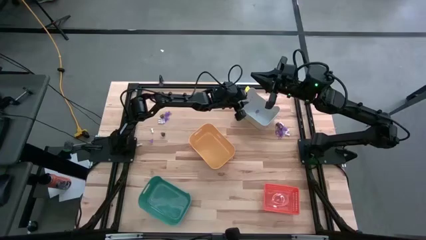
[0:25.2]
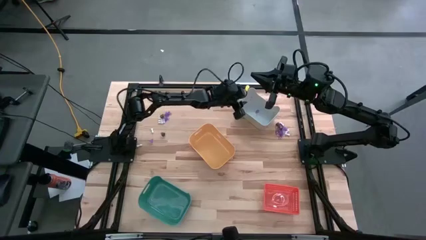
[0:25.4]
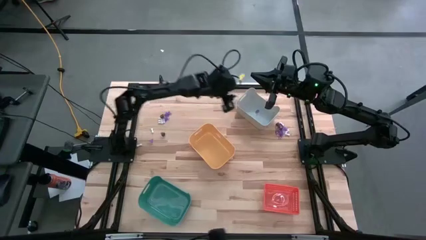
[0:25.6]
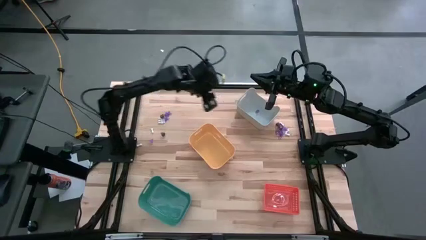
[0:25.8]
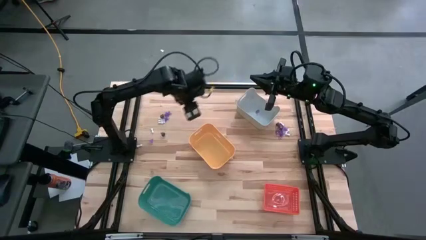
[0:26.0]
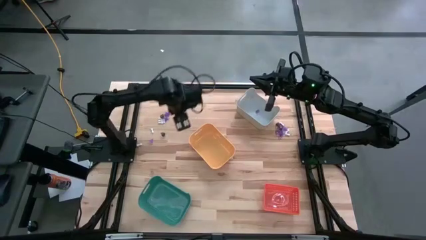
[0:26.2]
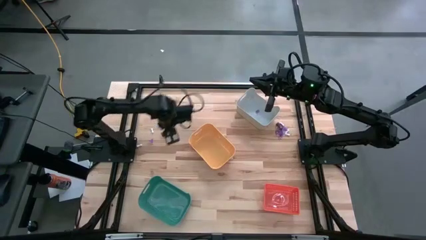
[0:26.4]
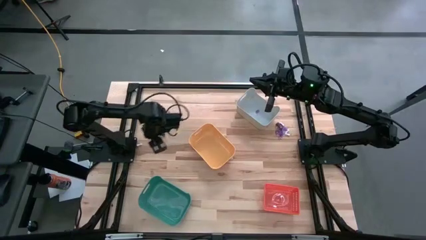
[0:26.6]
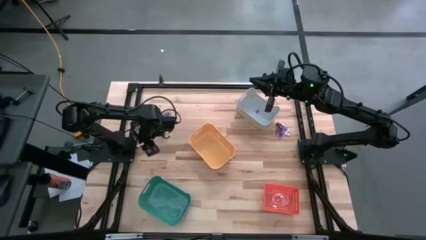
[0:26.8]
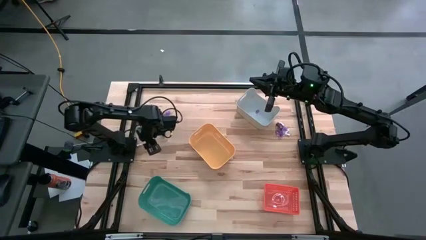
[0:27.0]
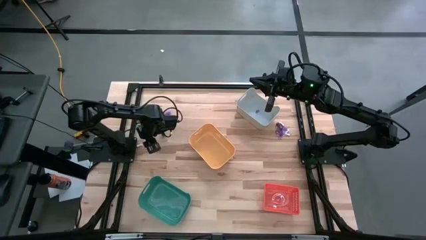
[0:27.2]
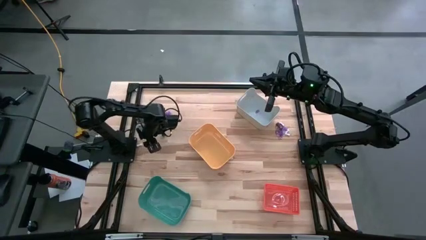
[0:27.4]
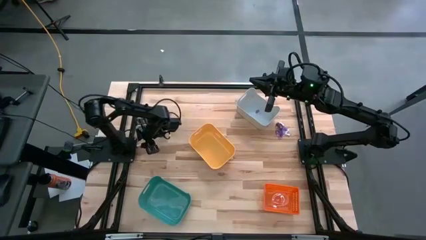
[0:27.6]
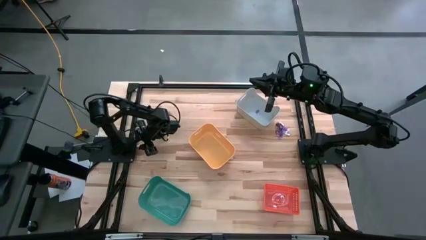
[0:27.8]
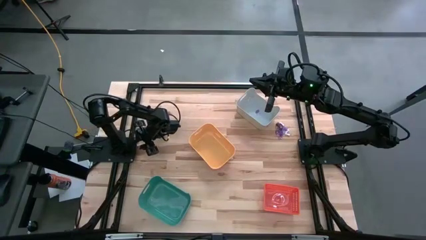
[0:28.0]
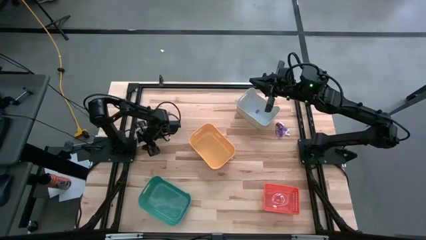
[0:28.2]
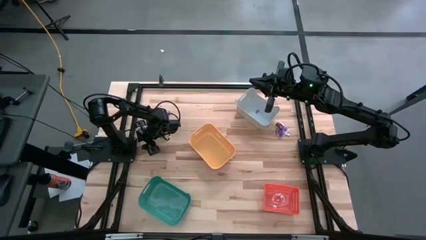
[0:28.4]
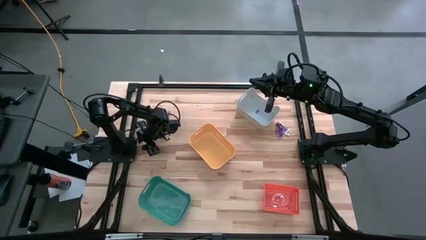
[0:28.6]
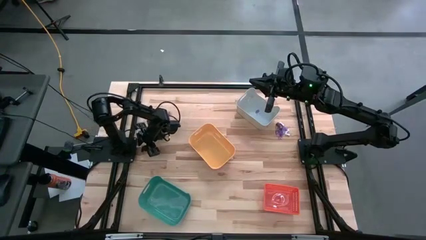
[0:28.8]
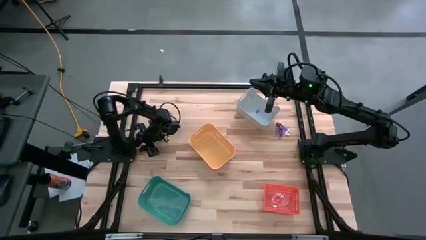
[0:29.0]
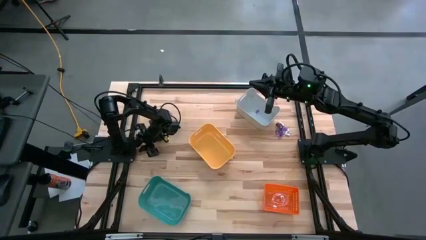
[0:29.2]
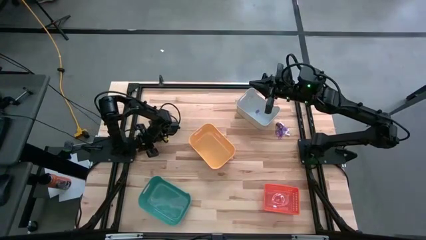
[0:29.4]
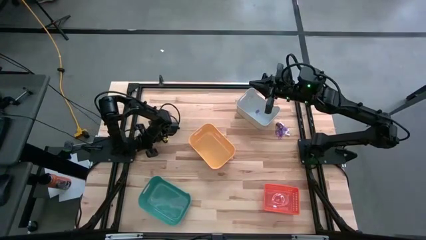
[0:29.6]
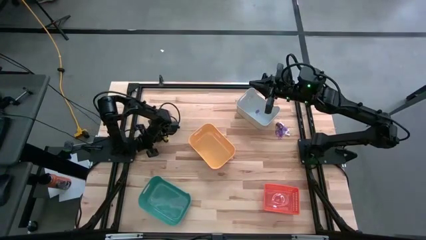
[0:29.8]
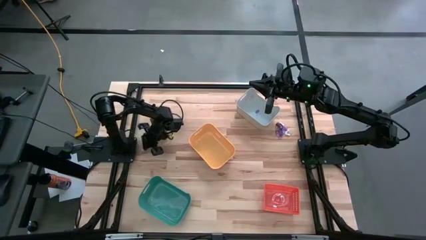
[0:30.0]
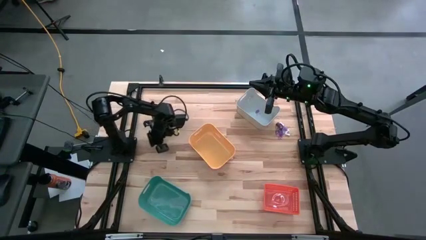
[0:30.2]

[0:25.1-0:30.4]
Task: Sort Halloween decoration
Put the white bone toy into the yellow bin

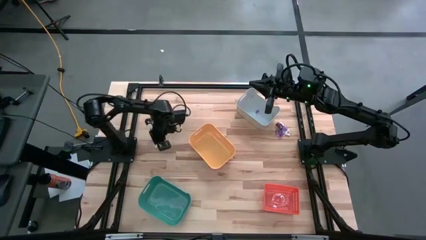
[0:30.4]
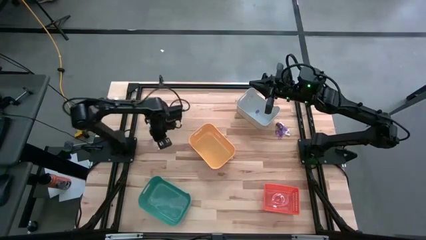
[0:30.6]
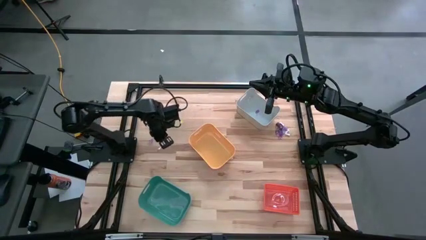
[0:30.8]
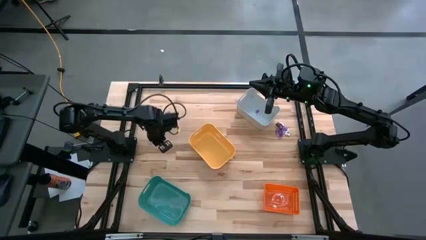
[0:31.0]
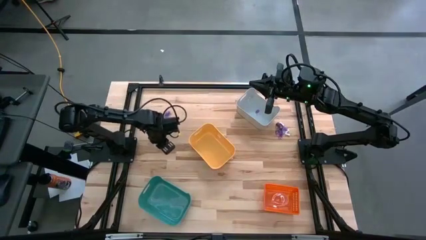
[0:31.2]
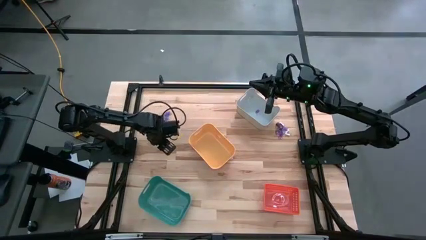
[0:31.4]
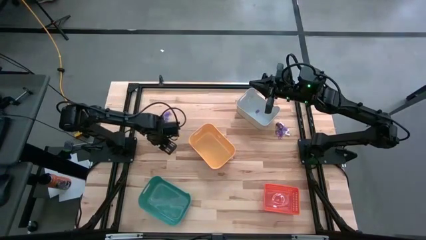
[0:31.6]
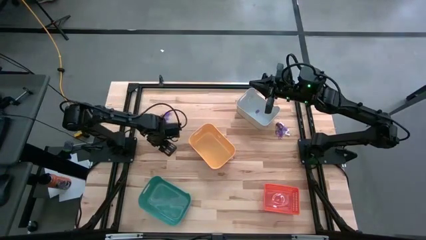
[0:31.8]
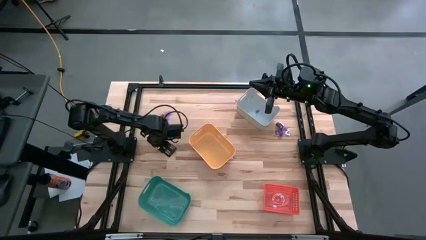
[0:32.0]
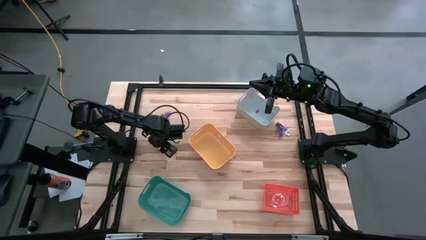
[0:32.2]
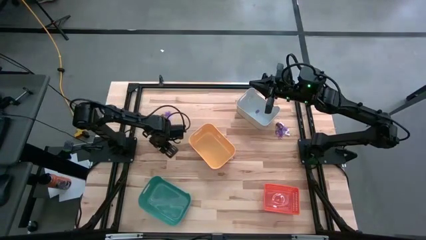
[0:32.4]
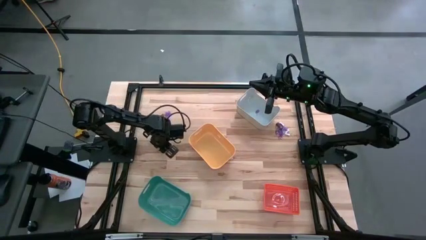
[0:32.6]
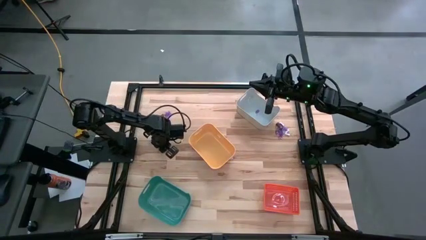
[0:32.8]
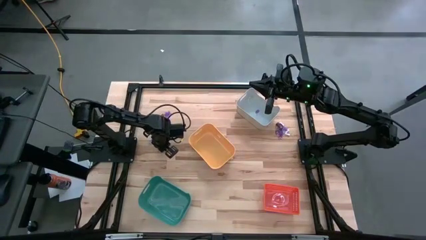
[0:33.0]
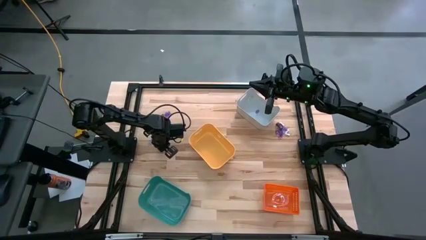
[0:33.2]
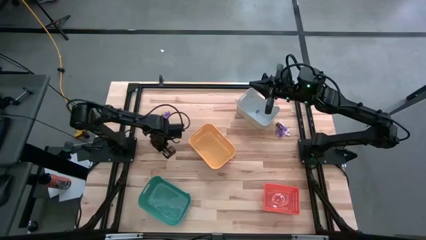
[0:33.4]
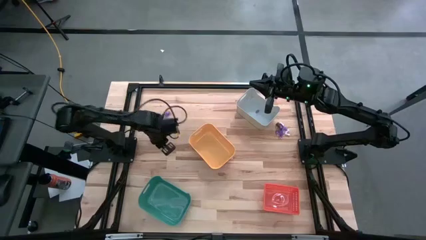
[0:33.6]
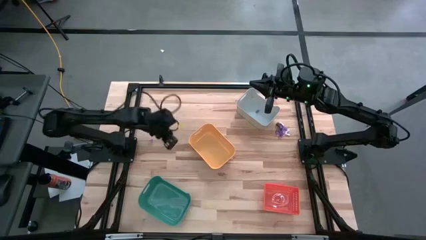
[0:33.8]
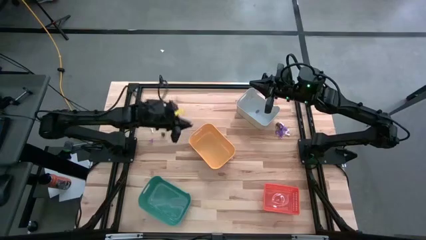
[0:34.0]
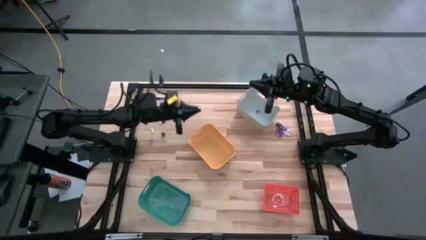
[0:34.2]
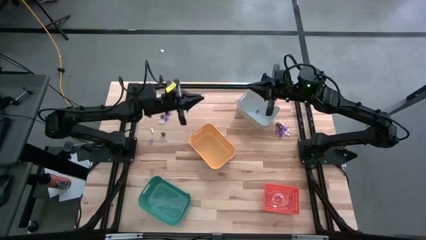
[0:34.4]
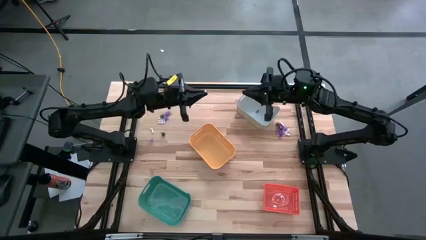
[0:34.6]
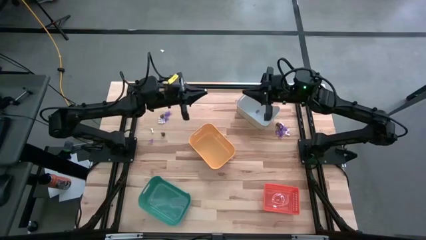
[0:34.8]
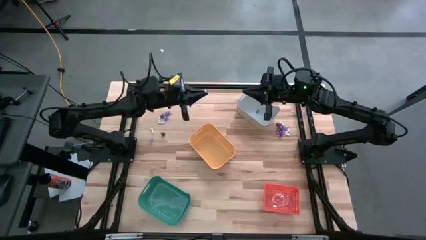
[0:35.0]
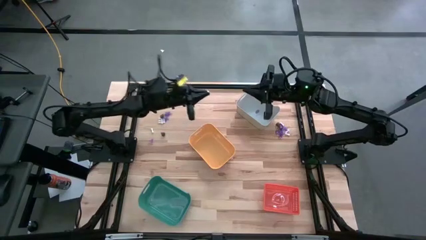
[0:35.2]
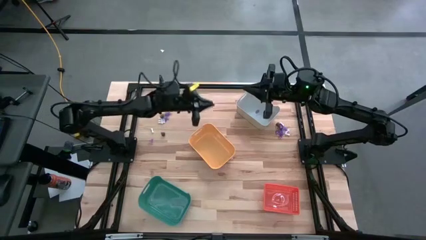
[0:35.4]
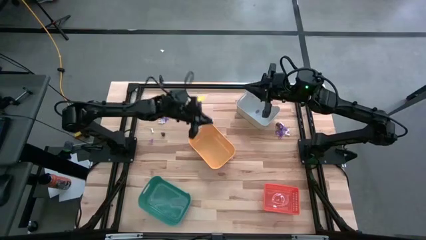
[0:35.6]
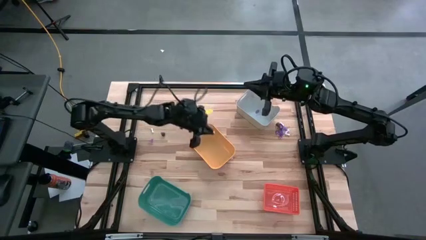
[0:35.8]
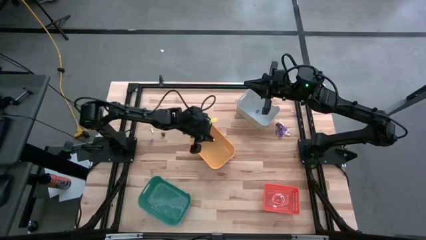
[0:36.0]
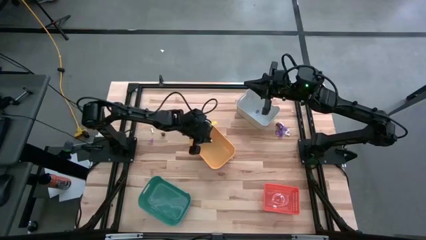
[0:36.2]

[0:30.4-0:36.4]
Put the white bone toy into the yellow bin

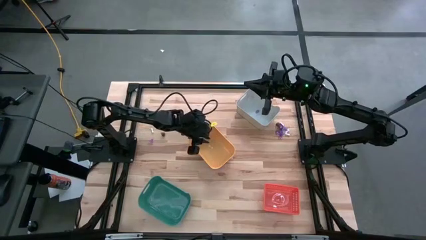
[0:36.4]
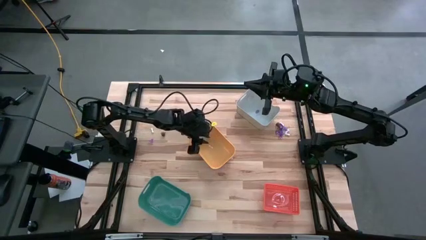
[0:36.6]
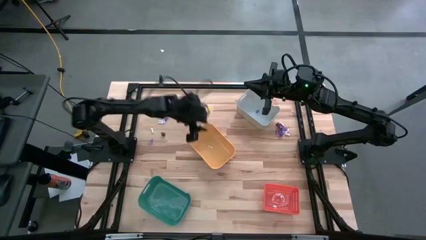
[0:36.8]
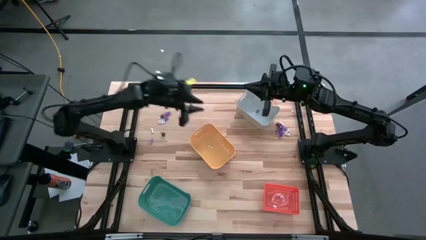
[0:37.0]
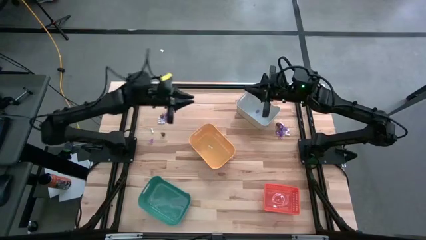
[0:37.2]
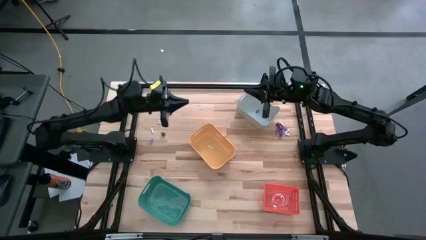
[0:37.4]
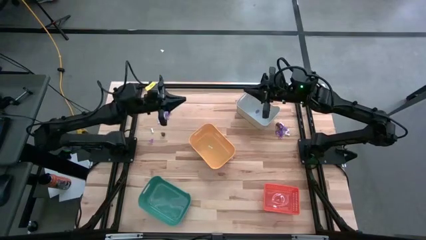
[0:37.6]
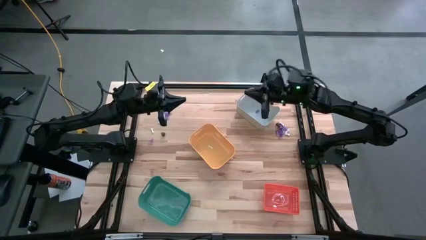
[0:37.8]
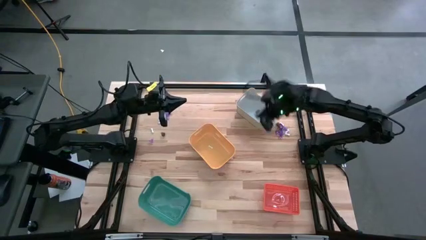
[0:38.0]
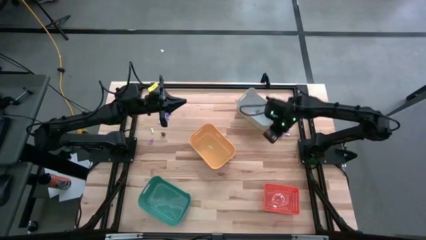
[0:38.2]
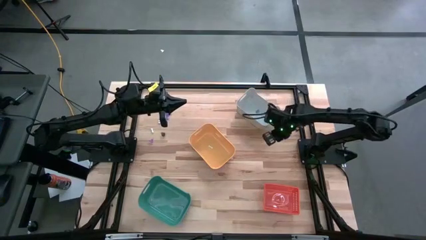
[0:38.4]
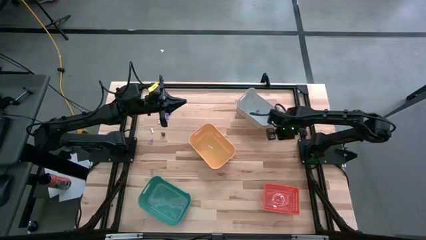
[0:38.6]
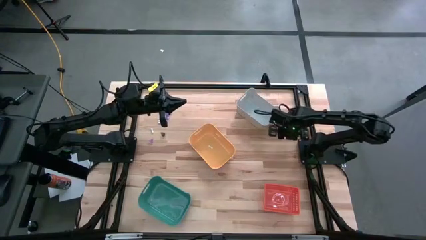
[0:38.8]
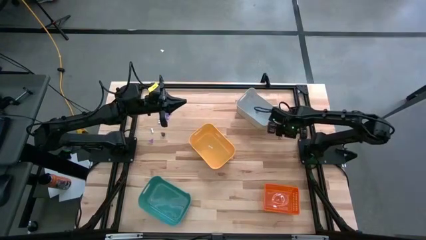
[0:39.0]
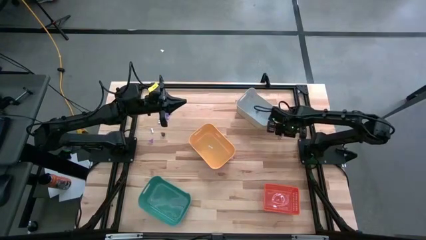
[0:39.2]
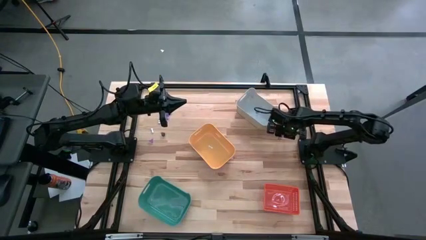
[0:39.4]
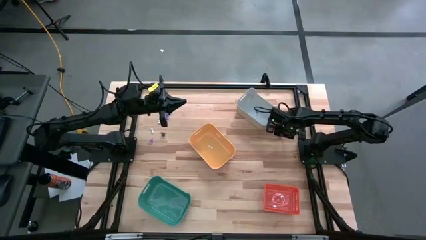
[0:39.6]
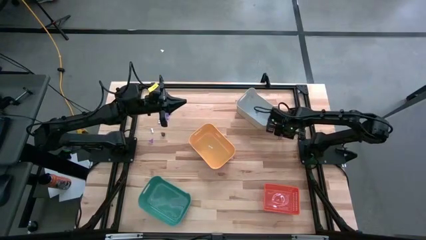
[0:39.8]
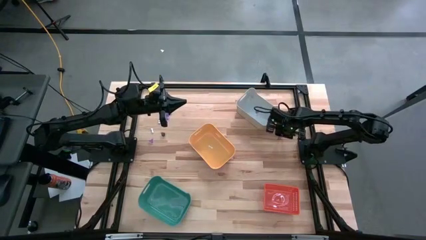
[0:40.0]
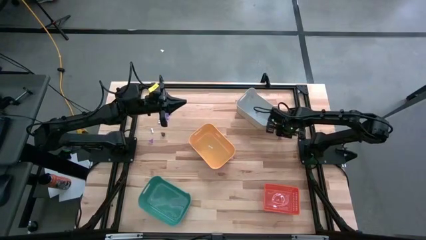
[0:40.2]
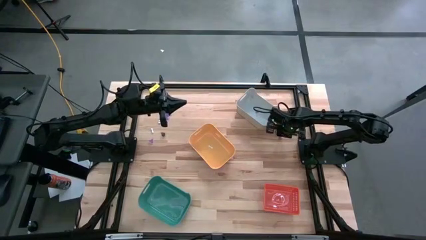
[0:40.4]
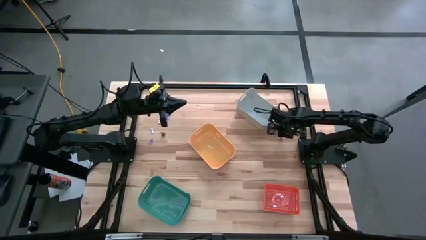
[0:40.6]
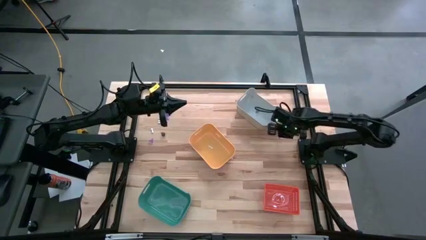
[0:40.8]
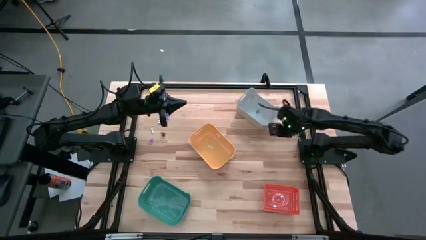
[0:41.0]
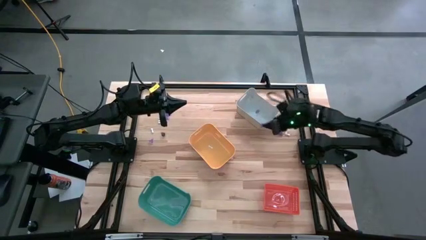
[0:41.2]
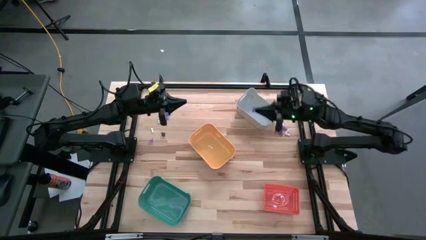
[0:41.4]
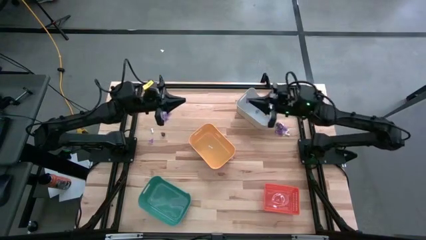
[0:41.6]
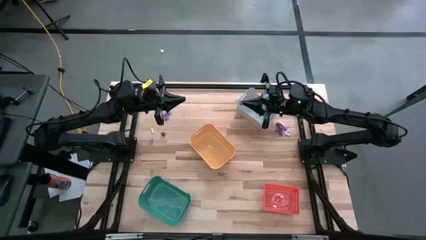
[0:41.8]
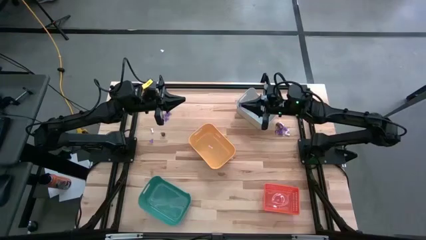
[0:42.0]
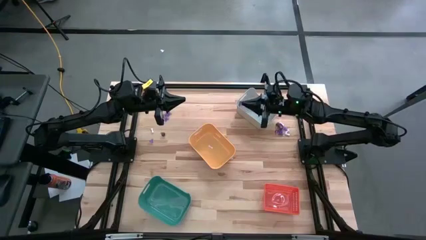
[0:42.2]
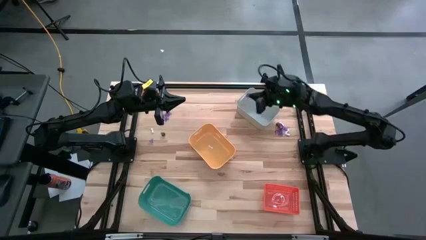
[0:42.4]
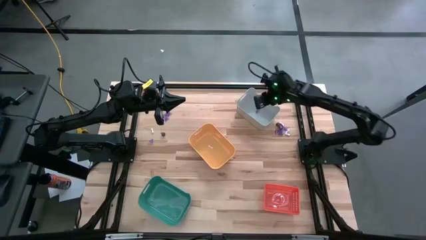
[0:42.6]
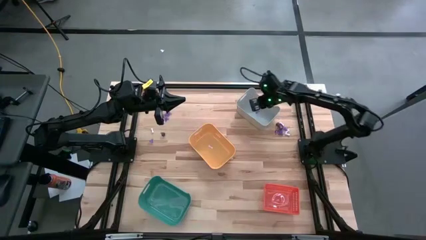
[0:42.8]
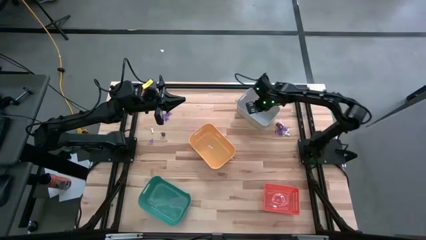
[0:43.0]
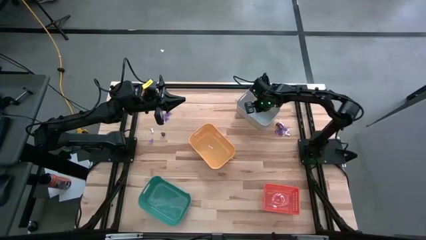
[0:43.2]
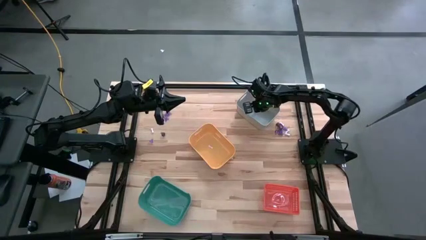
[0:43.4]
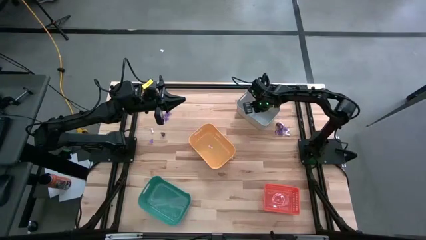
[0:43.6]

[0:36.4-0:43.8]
Put the purple witch hat toy into the white bin
